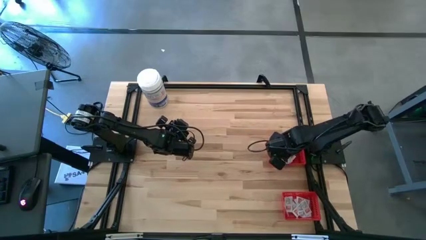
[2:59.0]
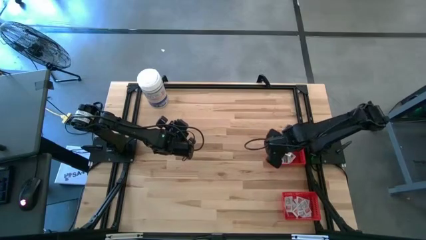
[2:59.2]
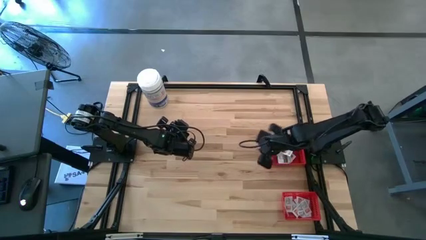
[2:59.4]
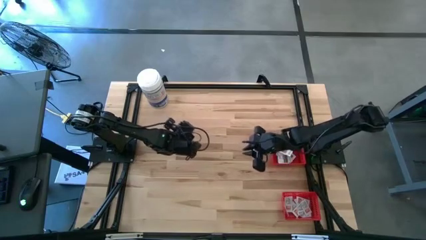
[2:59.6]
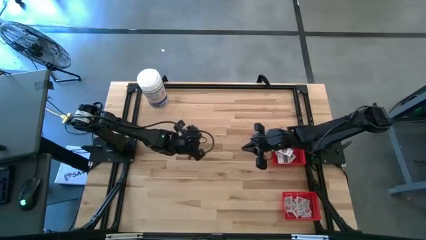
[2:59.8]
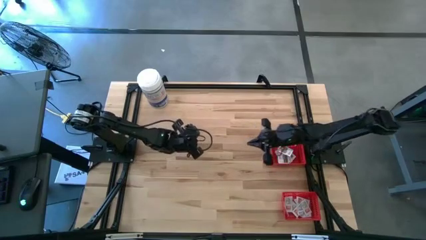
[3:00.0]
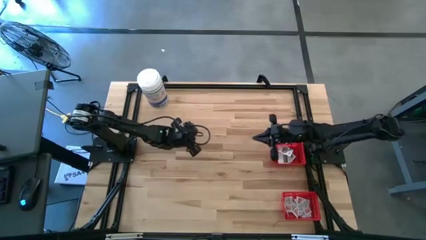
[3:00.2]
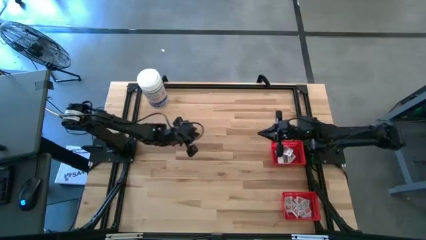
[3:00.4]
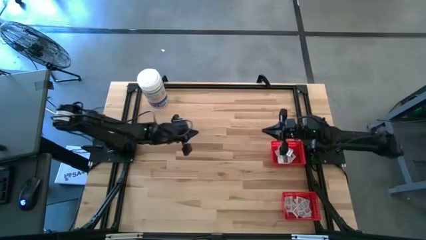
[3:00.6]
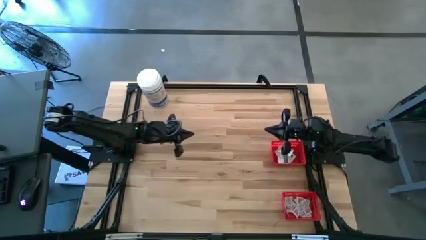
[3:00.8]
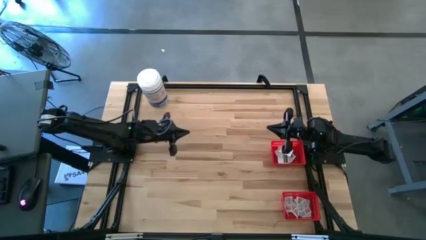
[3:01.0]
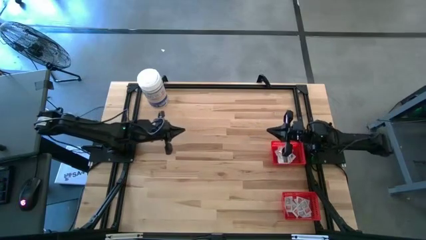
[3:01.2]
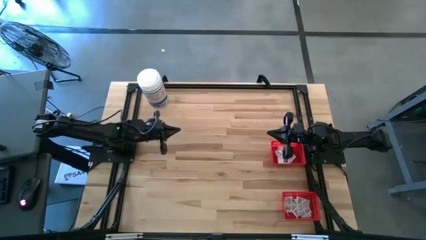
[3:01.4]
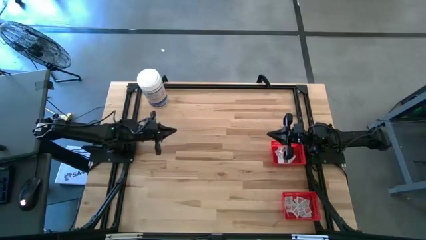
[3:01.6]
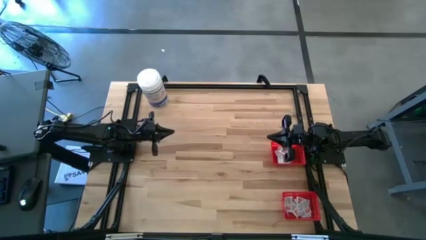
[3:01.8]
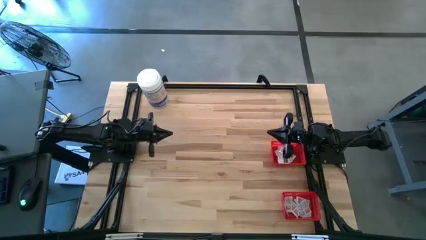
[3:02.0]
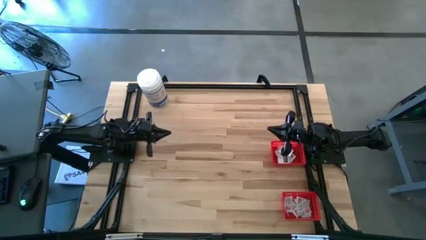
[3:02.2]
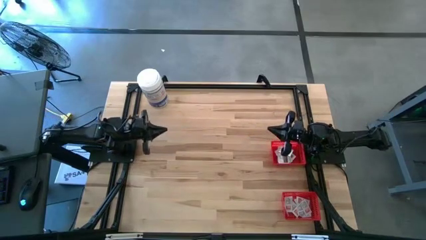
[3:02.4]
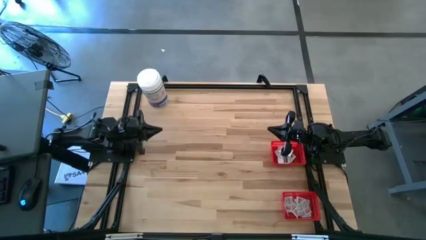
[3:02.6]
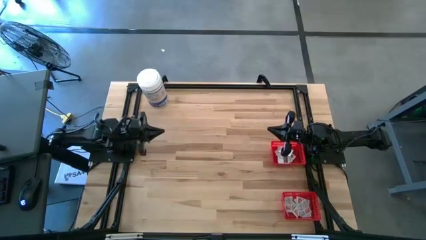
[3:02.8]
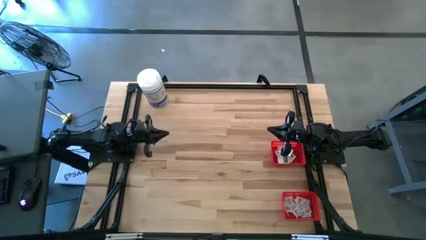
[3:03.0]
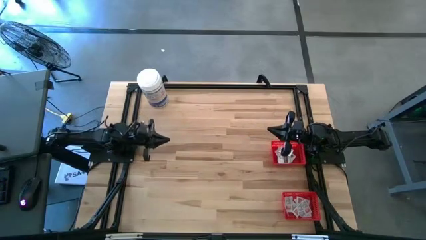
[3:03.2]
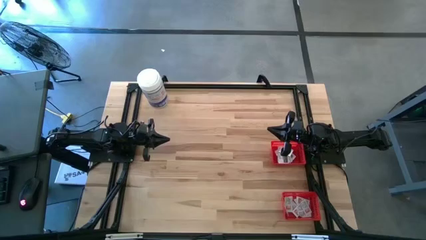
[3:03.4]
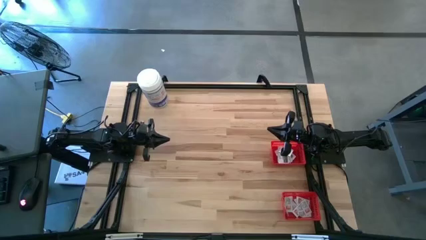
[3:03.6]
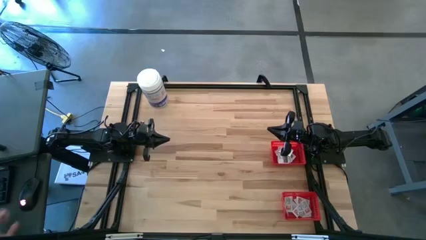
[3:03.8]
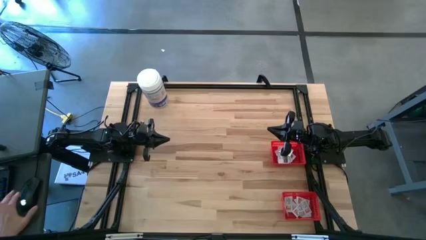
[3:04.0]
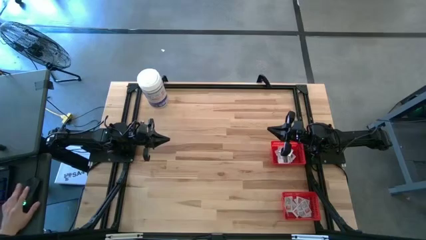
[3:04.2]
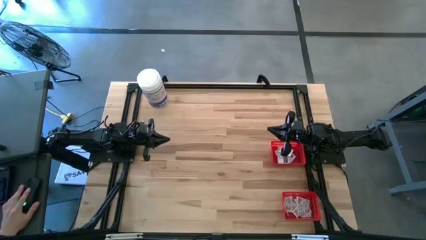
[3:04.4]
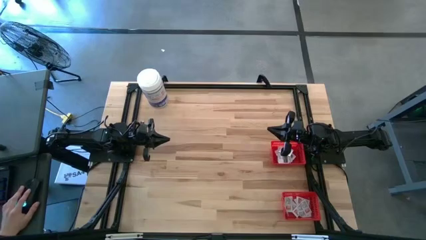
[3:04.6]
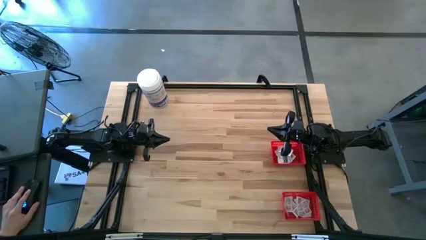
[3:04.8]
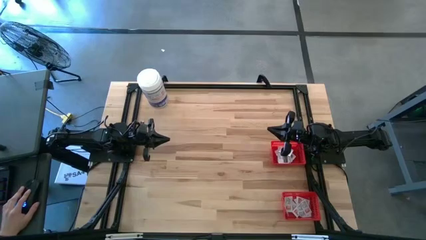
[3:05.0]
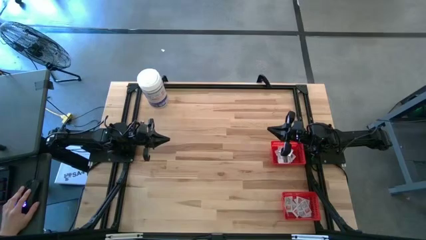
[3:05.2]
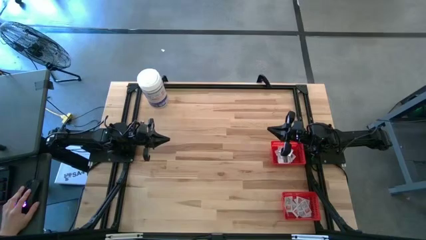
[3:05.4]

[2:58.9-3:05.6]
Task: Pick & Place First Aid Supplies
Return to Home Position

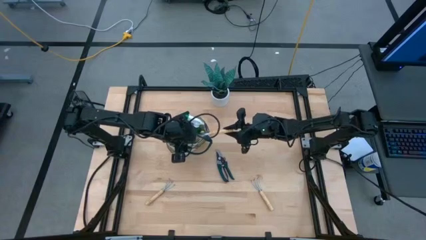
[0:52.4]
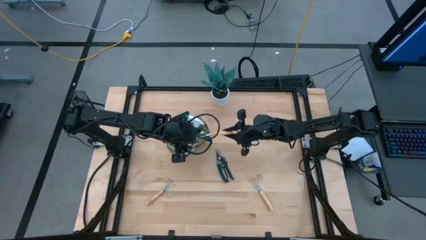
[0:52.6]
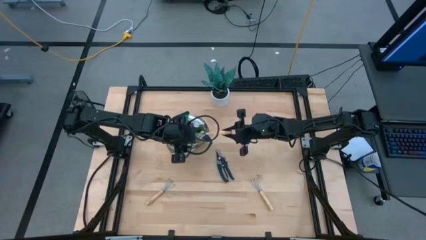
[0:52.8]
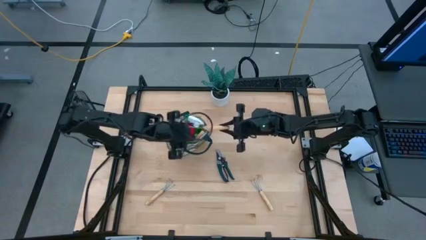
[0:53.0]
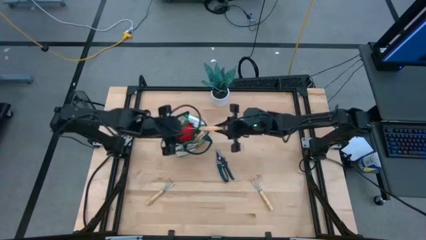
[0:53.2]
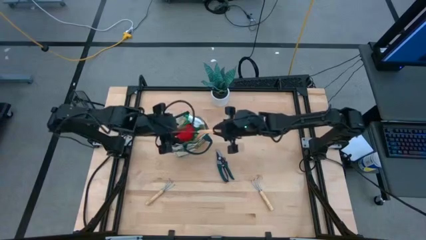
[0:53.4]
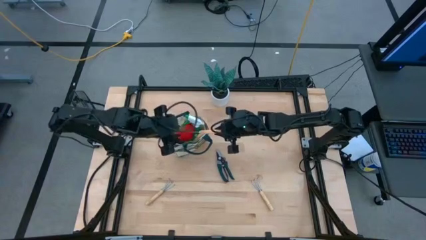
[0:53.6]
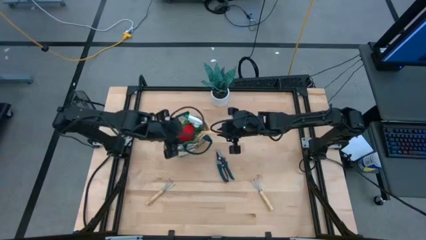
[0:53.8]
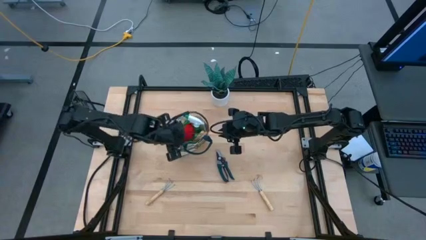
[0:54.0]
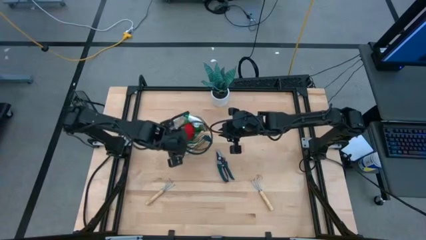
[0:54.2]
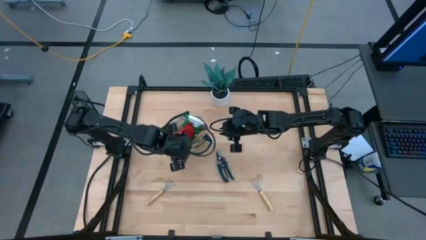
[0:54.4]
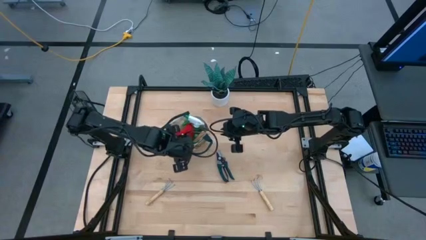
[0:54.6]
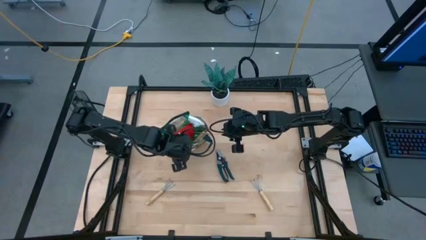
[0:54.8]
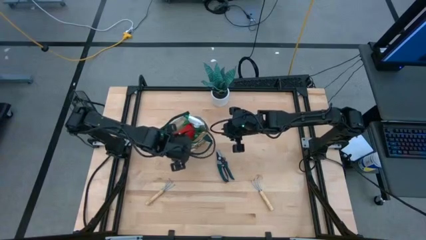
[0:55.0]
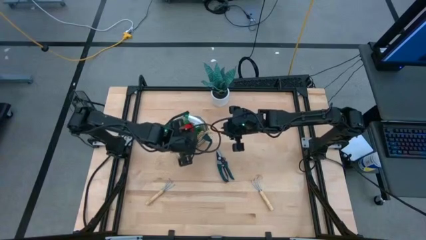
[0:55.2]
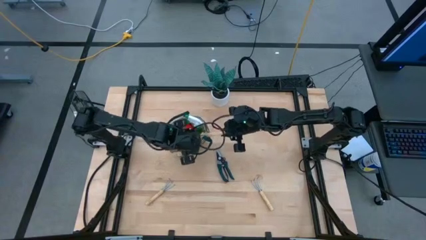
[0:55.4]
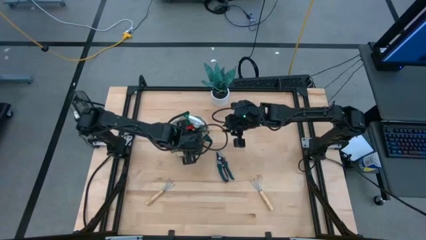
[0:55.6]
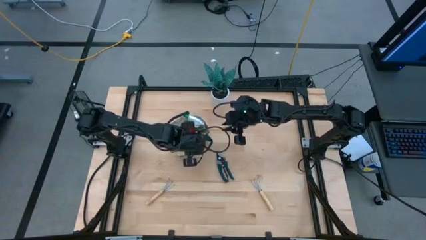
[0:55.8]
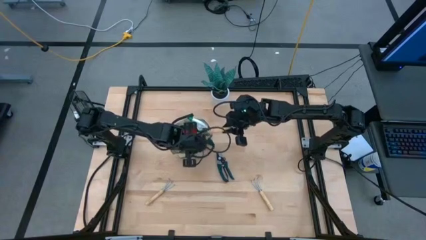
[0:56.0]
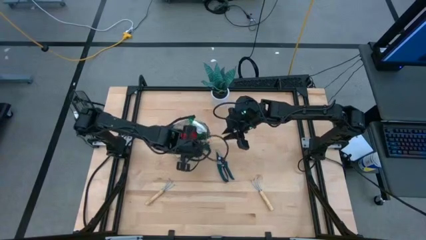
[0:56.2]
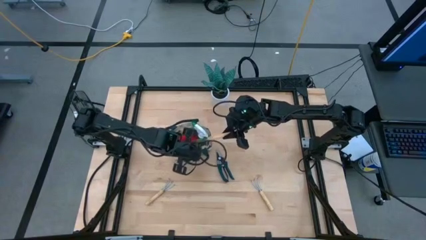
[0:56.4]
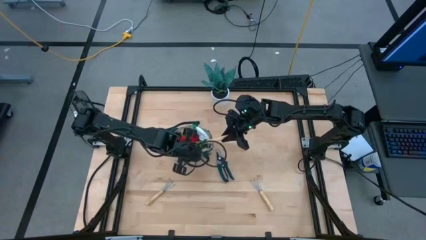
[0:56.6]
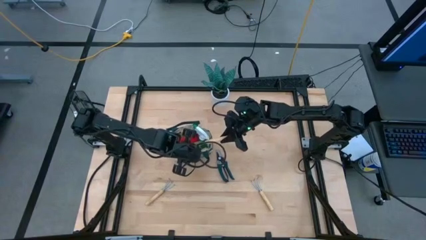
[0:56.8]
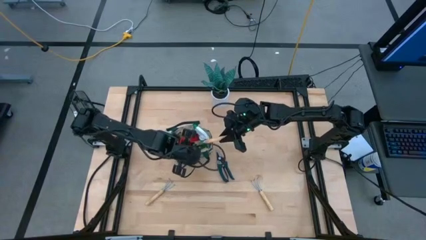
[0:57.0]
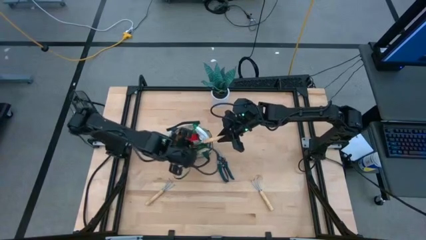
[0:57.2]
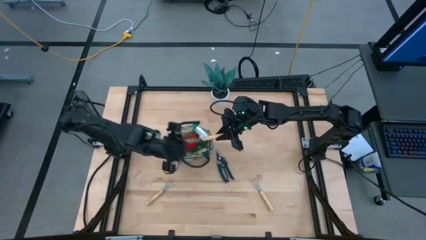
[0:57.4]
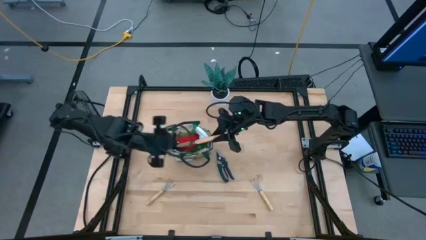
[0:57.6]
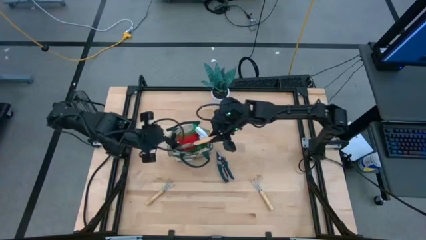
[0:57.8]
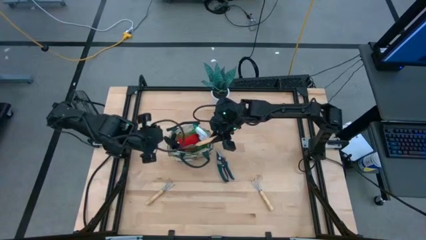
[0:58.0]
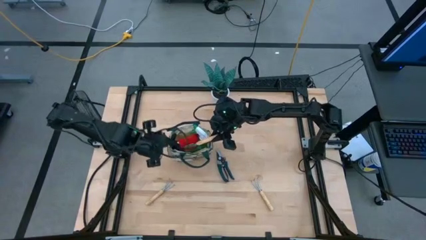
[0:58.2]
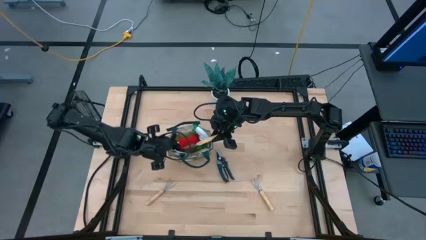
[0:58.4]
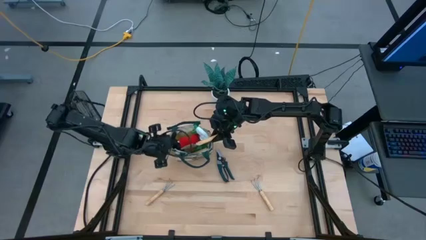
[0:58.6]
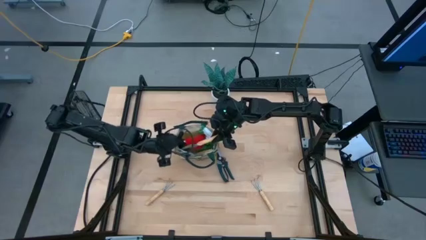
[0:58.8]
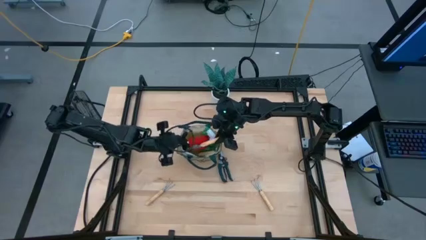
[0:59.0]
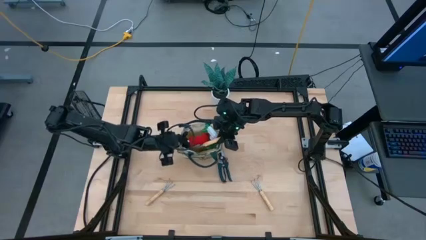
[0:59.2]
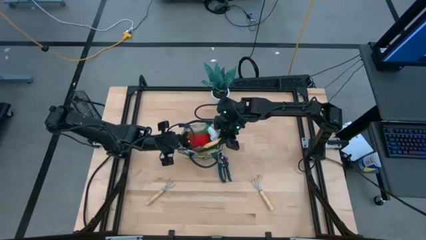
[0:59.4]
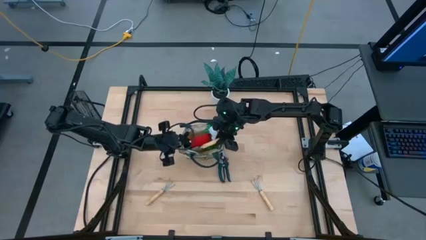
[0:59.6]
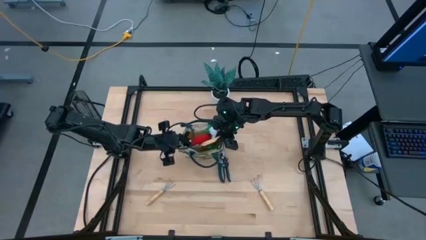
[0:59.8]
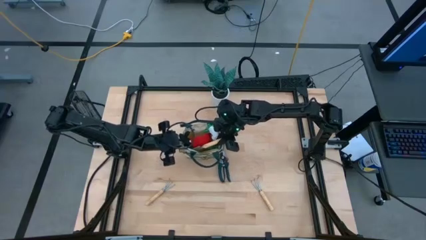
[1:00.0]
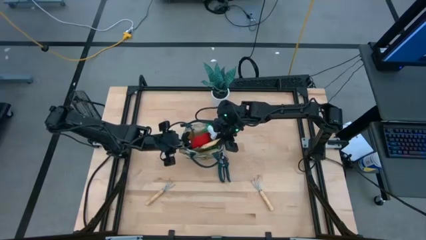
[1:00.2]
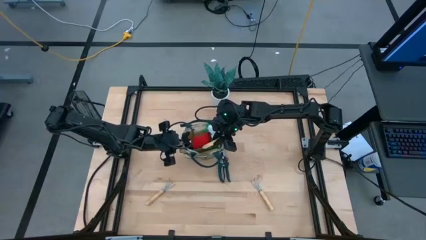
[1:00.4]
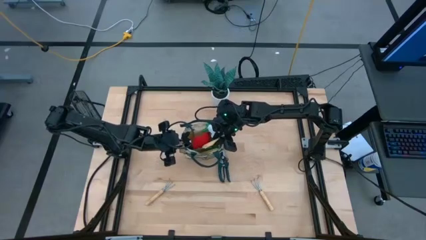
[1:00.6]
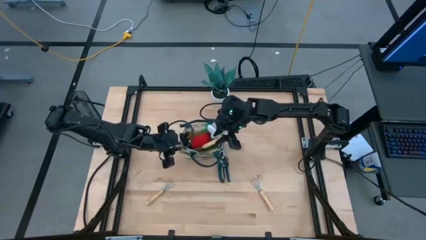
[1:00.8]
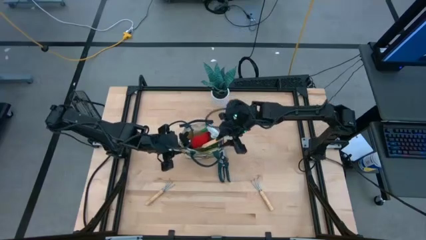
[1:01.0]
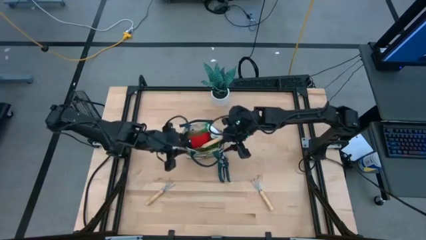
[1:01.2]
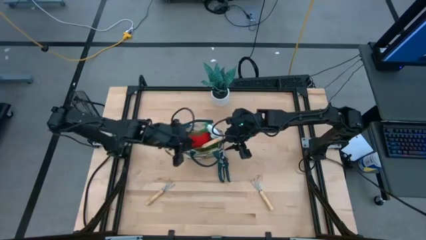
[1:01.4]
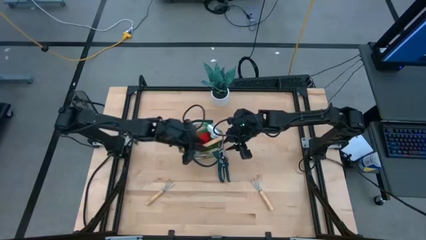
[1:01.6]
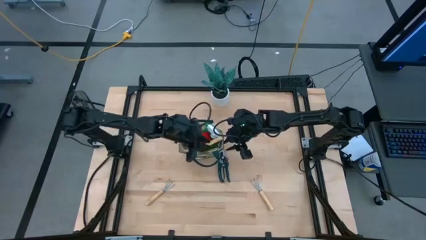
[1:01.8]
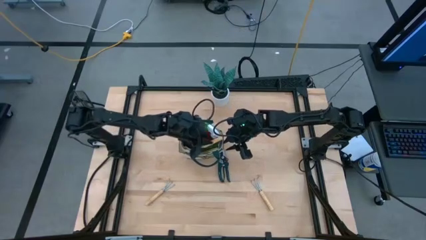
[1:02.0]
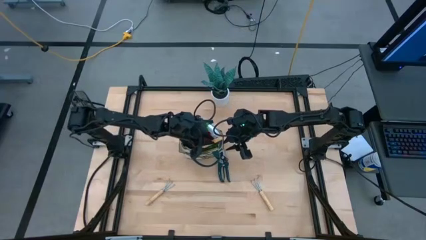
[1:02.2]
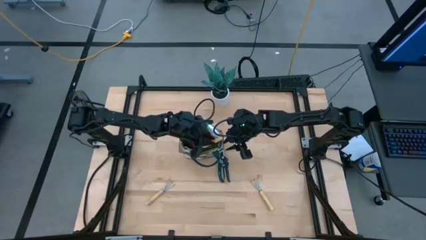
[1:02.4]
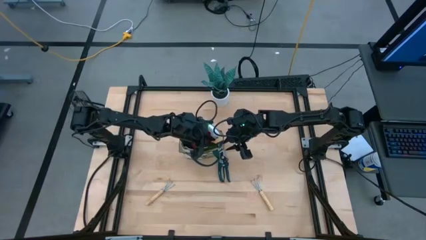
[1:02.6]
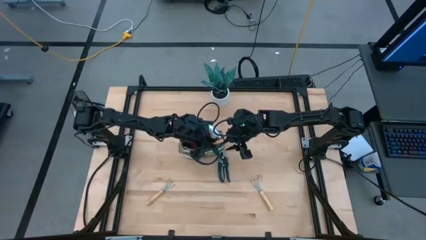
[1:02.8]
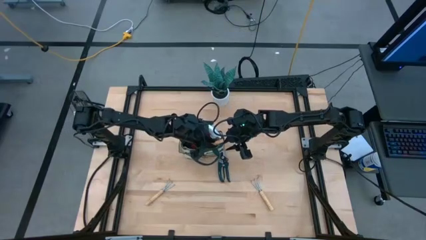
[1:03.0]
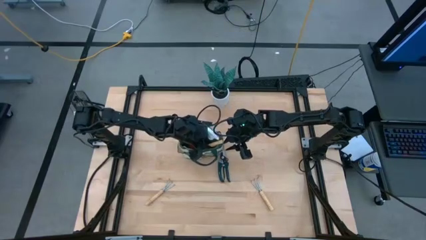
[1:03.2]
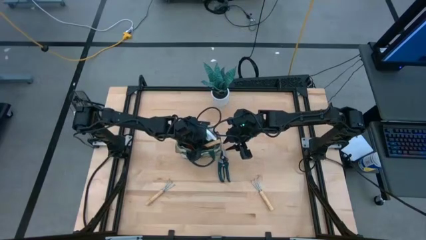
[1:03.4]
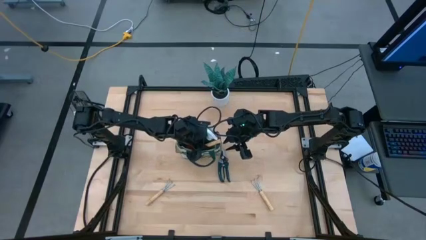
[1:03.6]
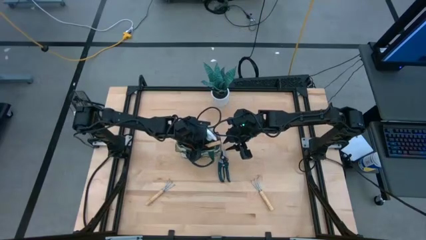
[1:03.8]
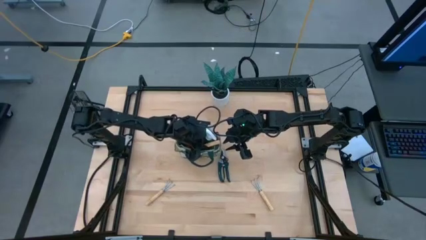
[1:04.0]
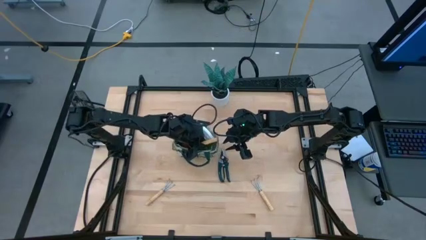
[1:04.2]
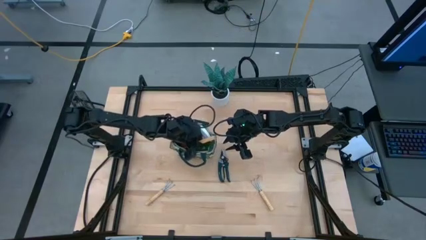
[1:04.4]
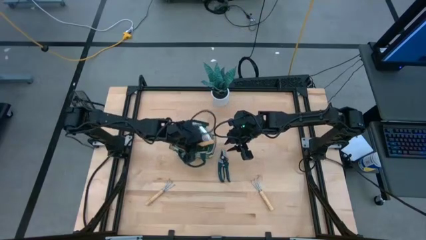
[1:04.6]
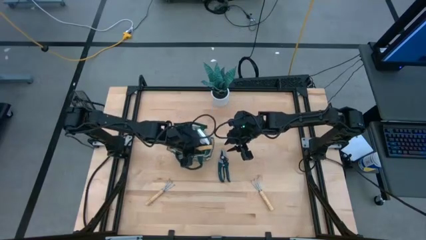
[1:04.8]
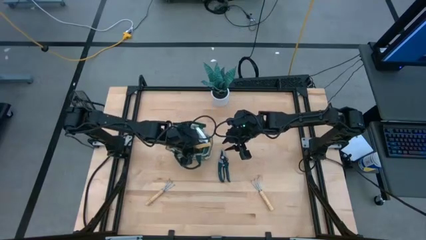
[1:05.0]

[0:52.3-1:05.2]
Task: Pick & Place Garden tools in Gardening bag
Put the brown trowel into the brown gardening bag
